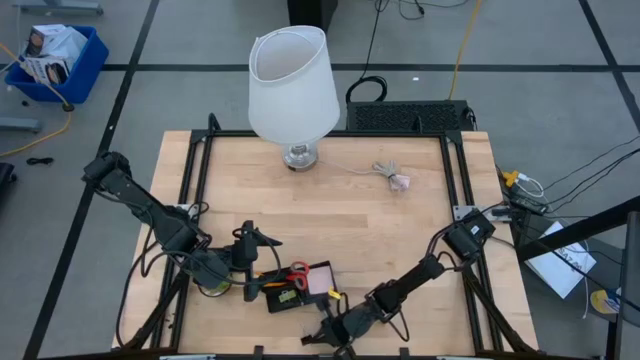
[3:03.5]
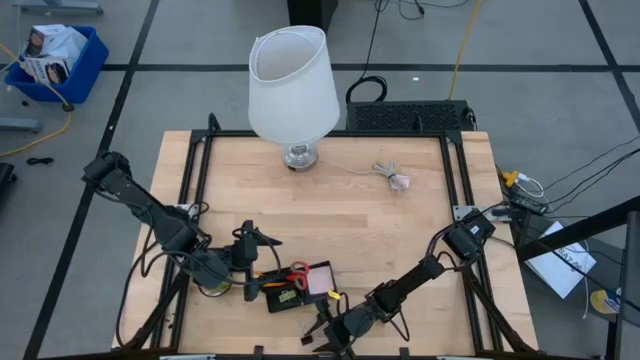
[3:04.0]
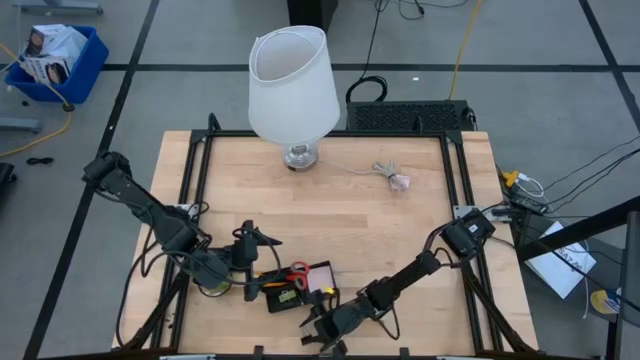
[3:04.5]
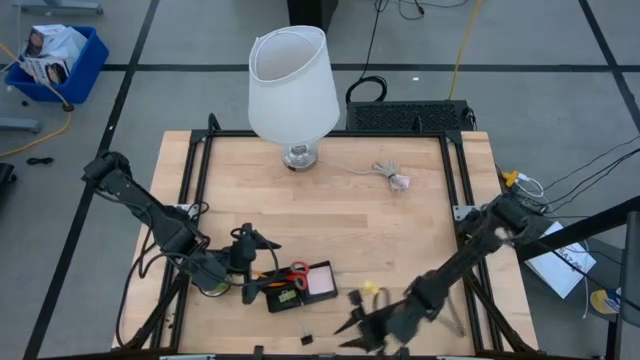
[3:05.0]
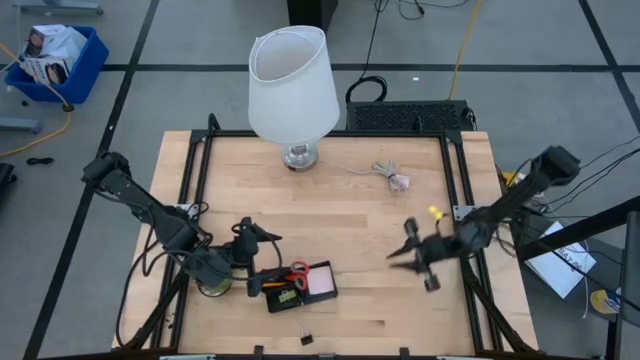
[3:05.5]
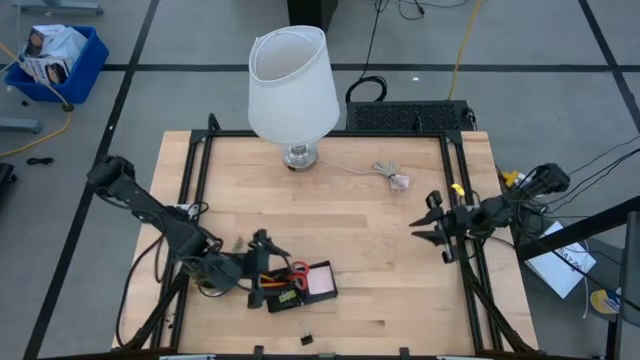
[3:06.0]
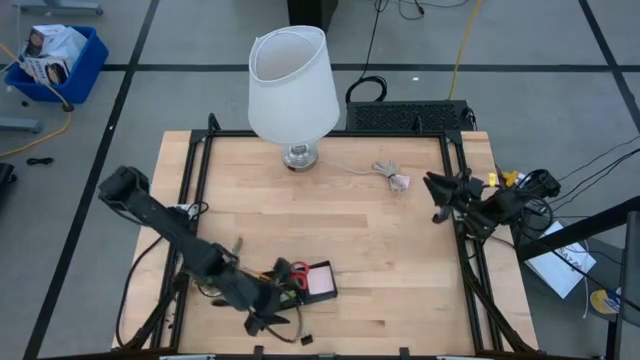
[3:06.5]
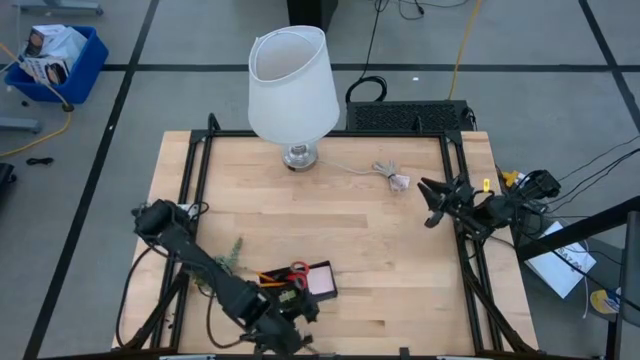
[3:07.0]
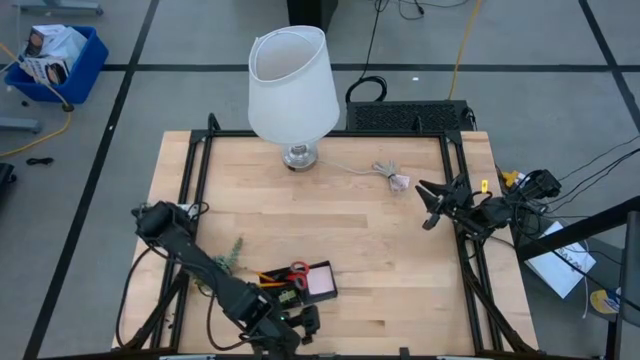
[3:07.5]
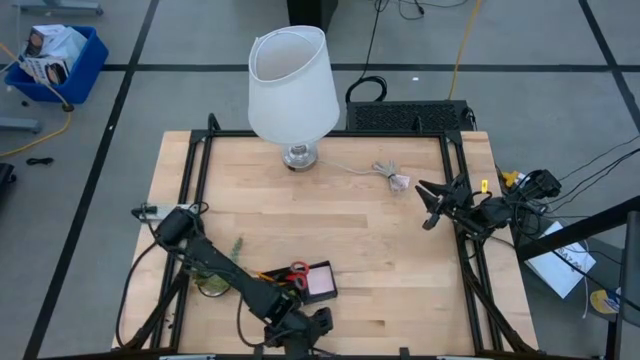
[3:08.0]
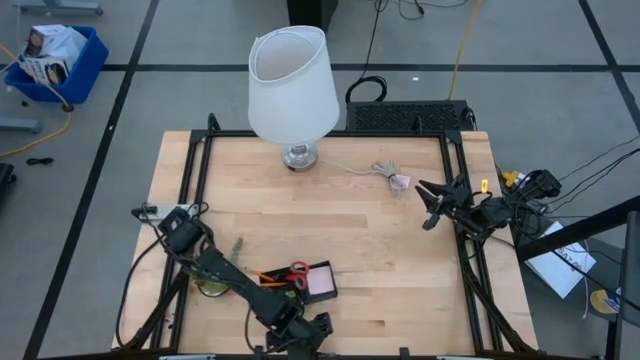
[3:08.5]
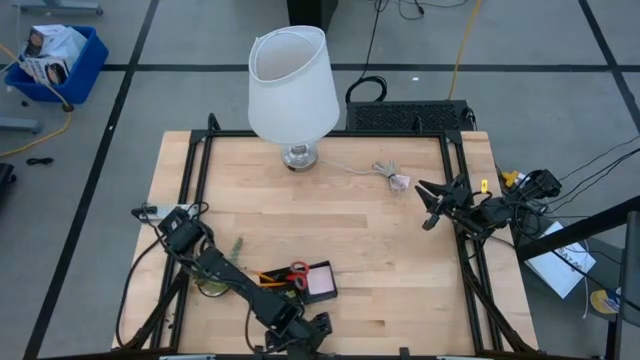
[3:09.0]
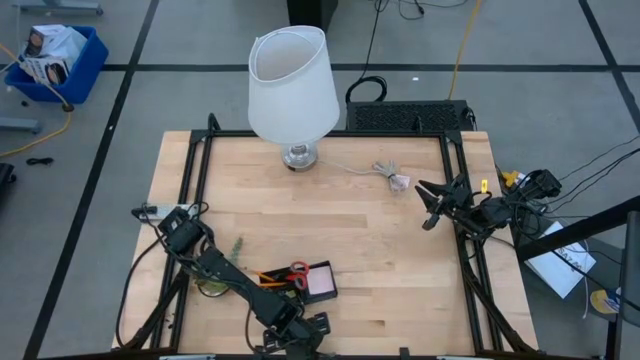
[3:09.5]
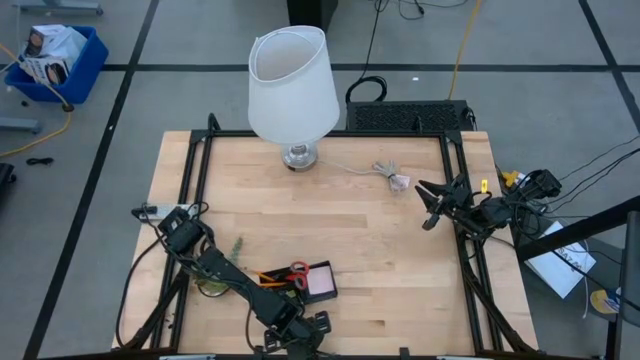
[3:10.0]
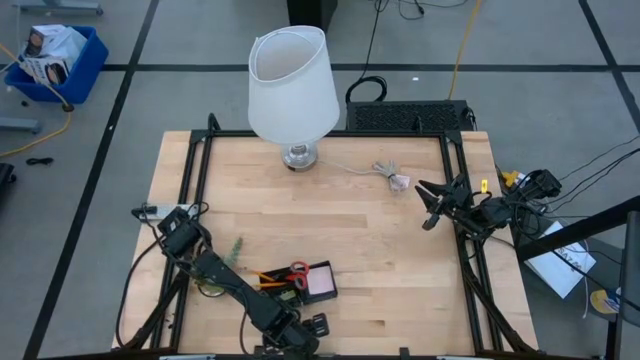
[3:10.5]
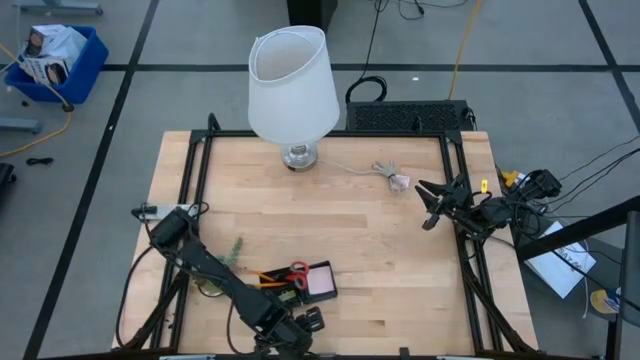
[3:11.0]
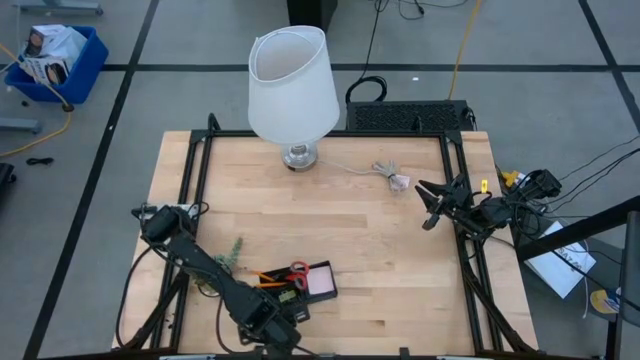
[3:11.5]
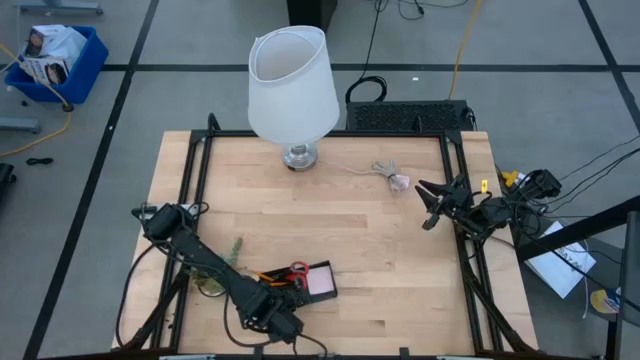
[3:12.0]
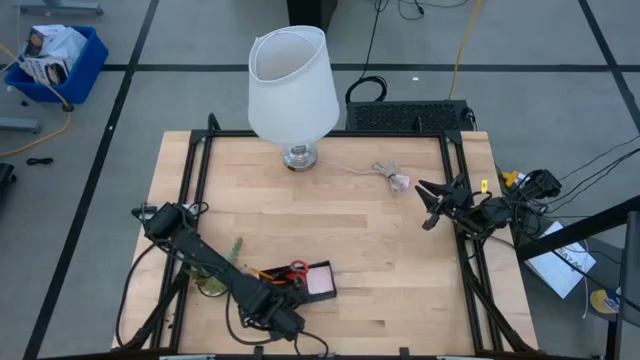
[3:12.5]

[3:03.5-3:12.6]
Task: Pick and place office supplies into organizer
Put the black paper clip into the black desk organizer

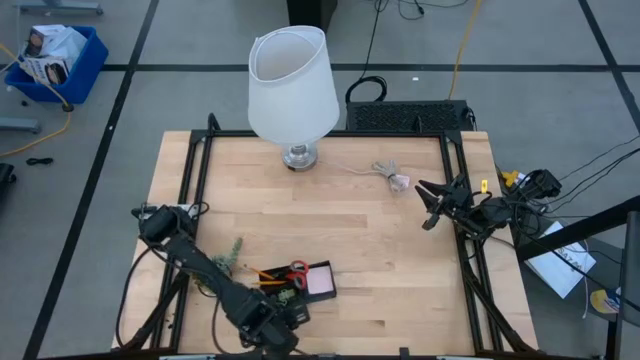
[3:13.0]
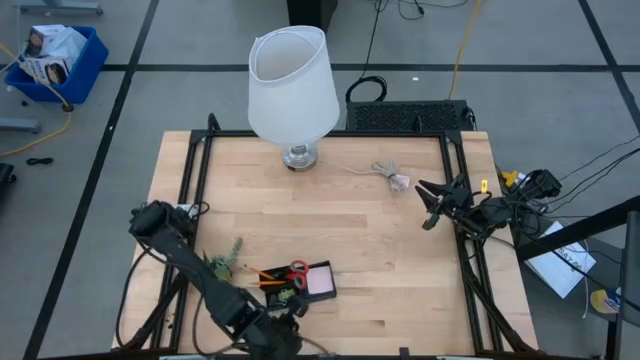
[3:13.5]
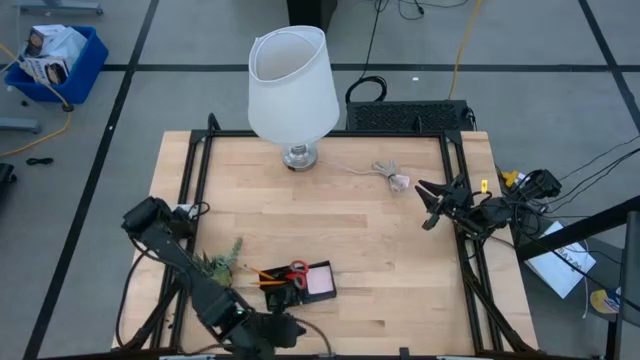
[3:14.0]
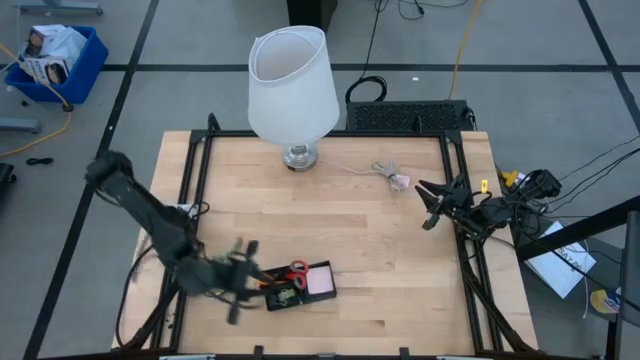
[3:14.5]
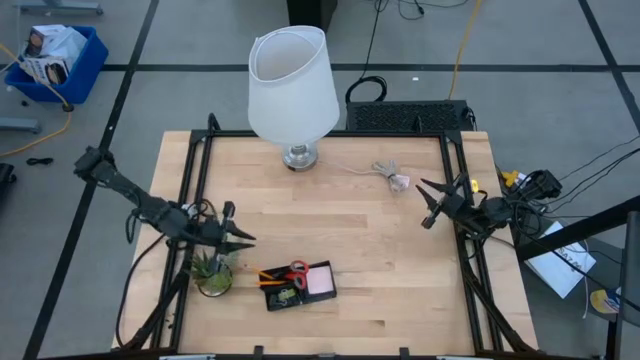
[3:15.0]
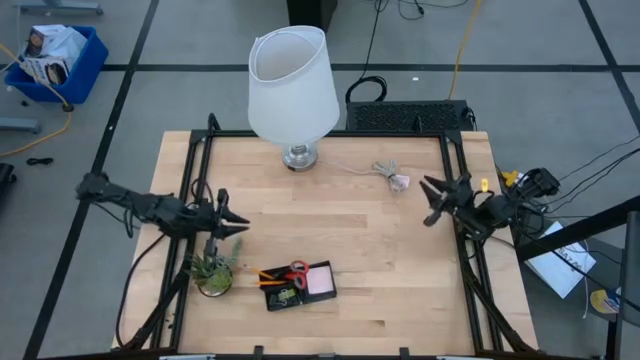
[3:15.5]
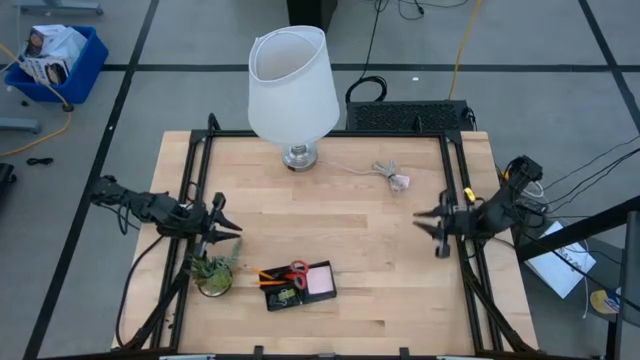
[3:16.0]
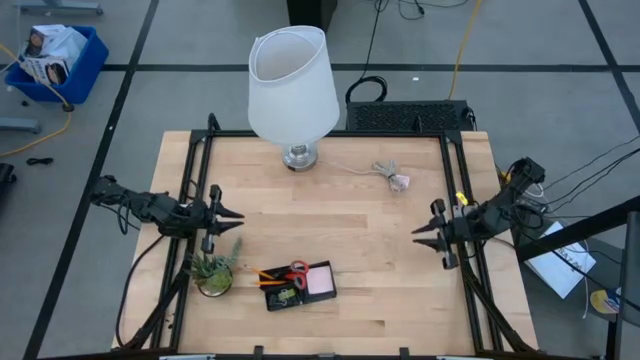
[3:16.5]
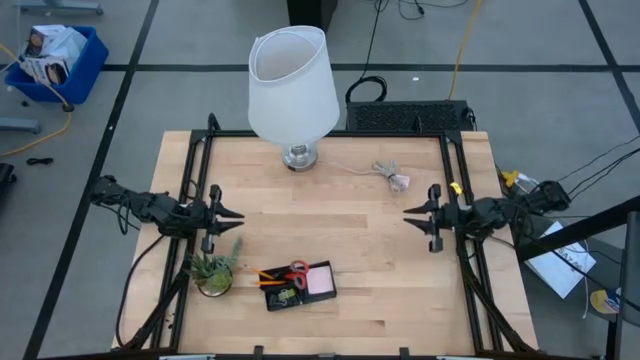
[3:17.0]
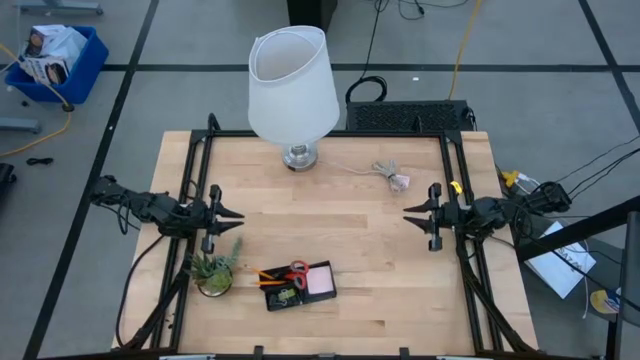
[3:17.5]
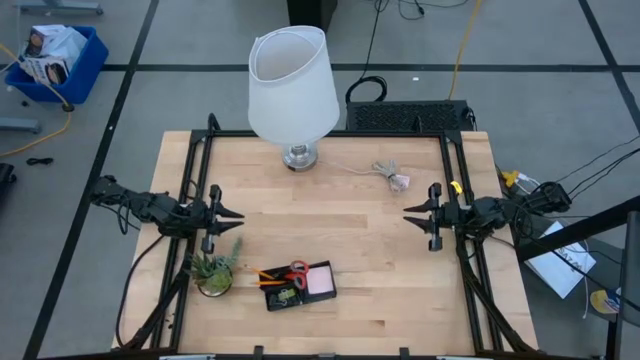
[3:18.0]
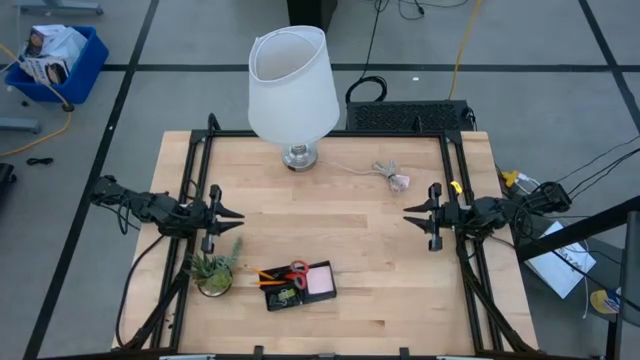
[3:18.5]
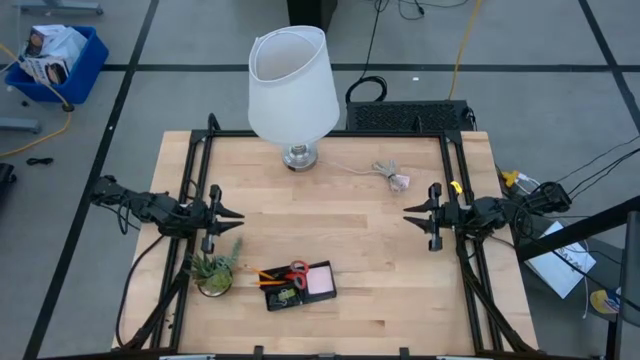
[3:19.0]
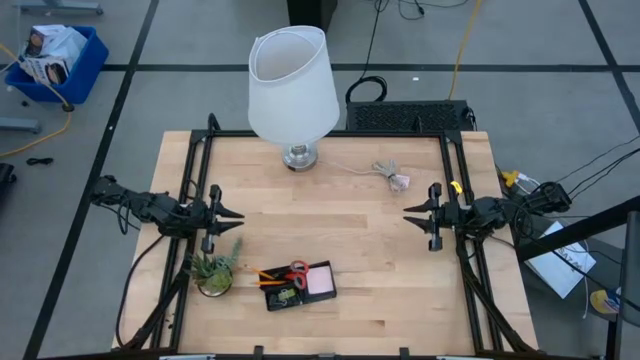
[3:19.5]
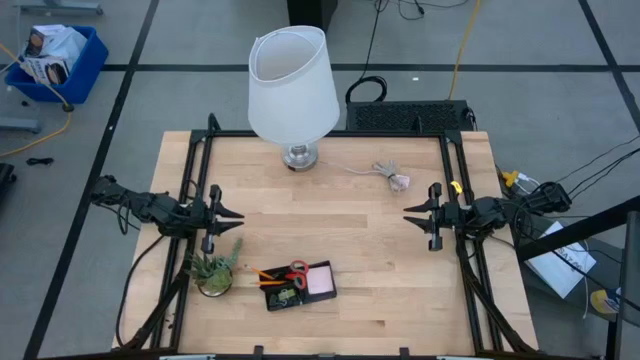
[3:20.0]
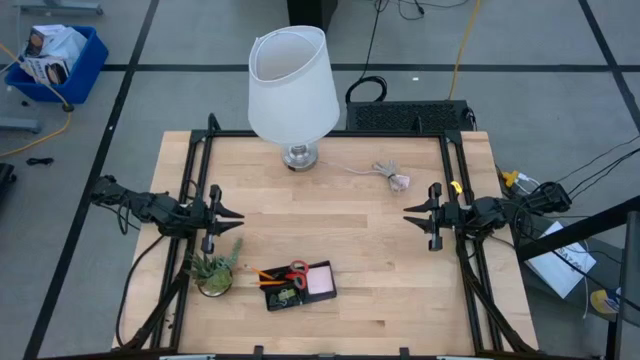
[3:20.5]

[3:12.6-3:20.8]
Return to Home Position

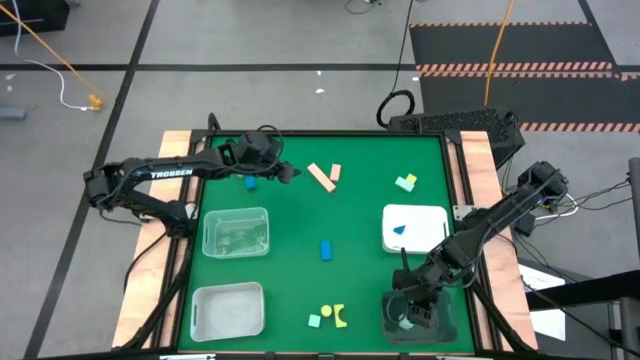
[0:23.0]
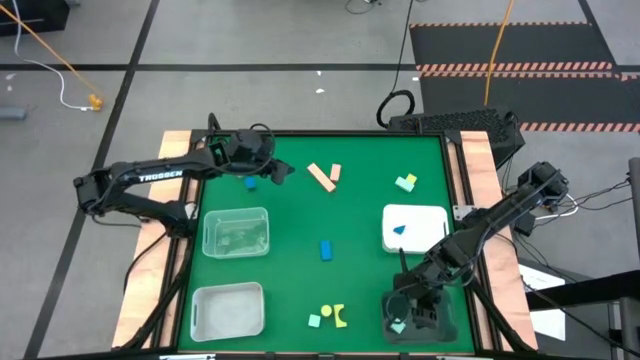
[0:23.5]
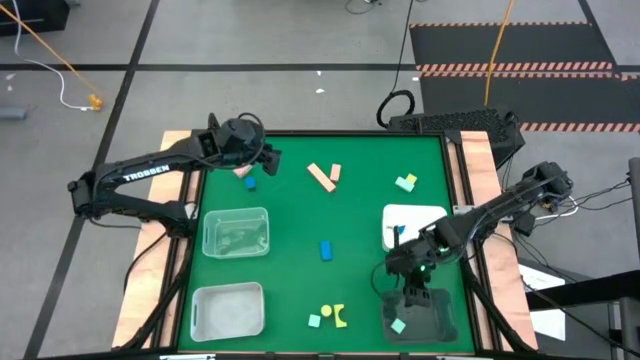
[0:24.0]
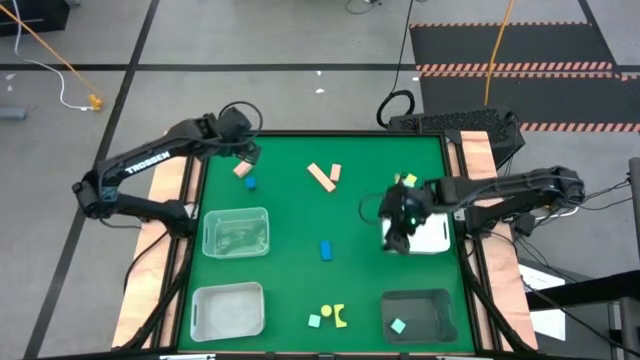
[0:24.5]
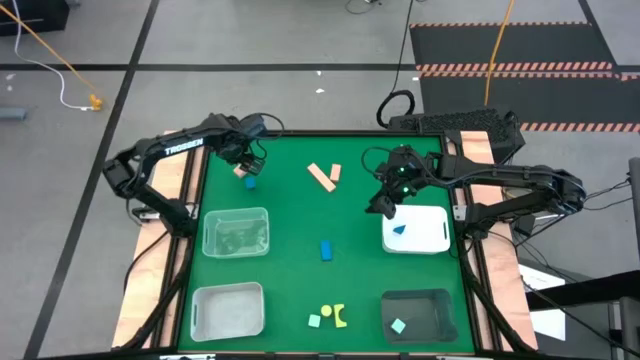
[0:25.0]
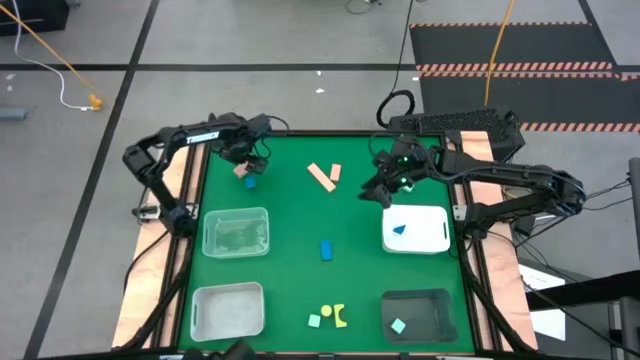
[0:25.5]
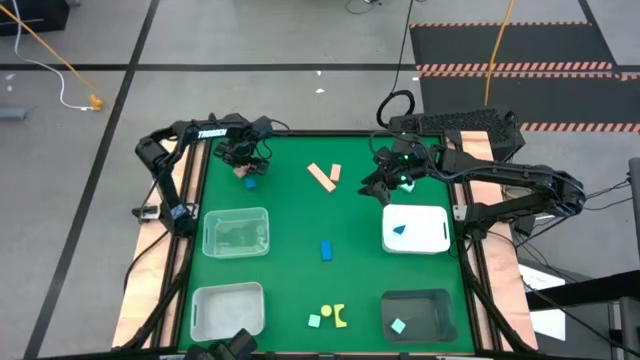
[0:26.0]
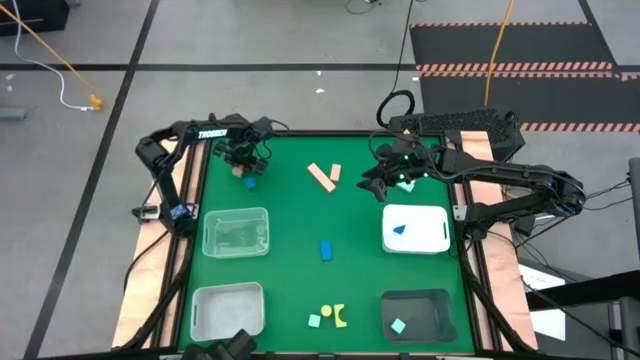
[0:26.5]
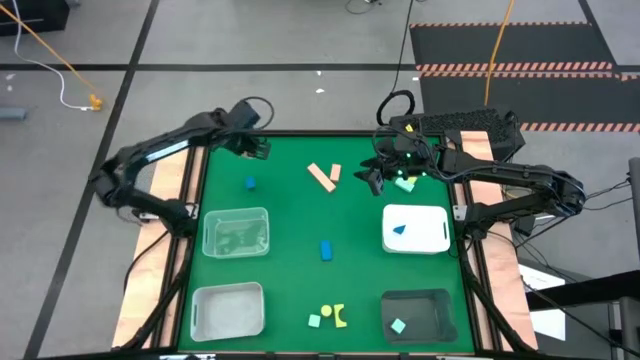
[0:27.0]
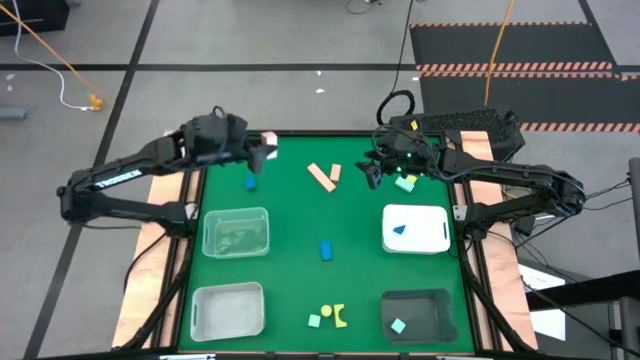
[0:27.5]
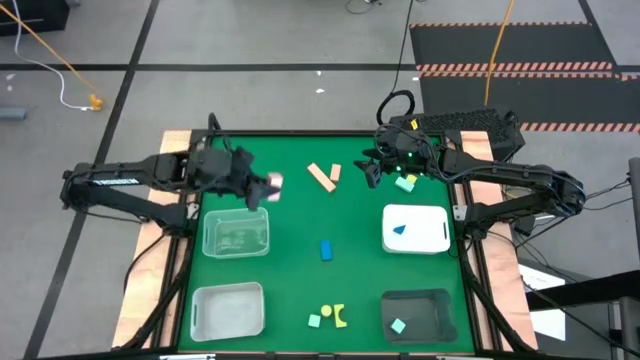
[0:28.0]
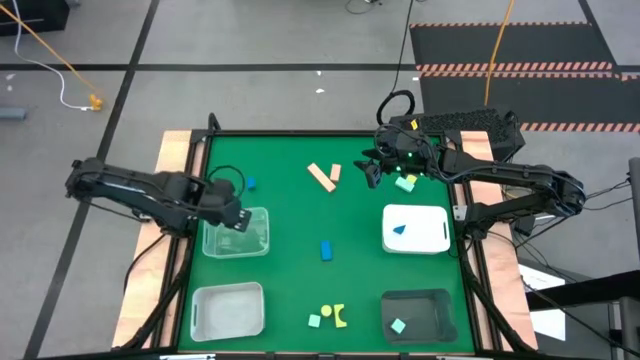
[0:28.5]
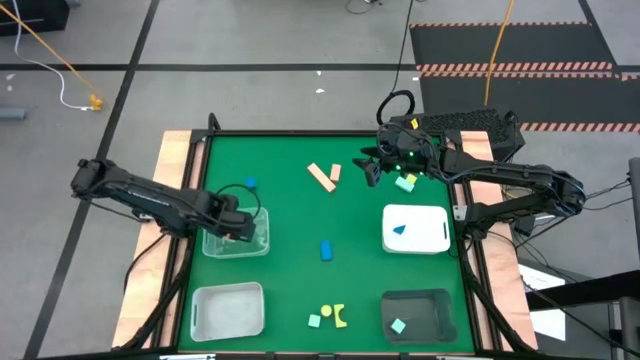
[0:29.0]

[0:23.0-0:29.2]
Task: Sort & place blocks by color
Put the top left brown block into the transparent bin
